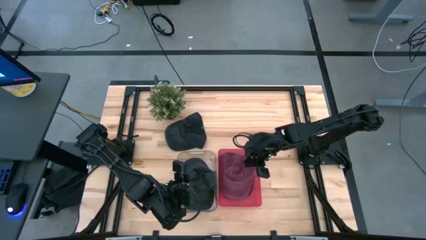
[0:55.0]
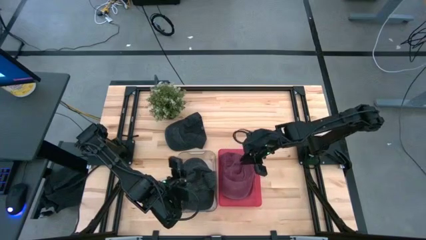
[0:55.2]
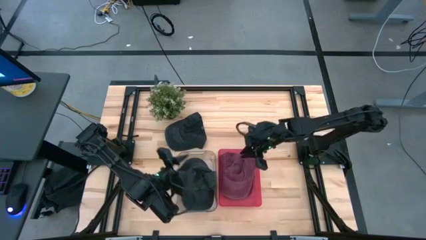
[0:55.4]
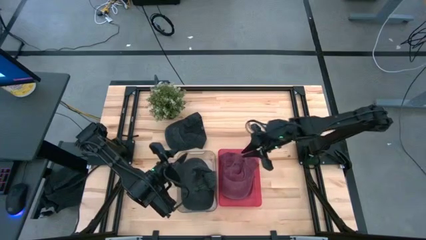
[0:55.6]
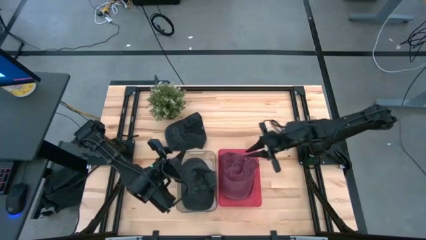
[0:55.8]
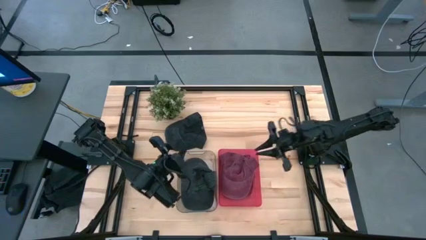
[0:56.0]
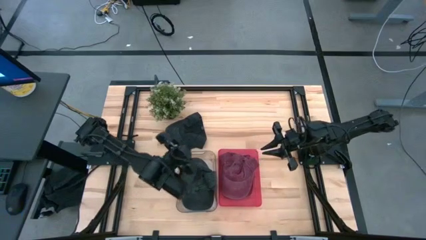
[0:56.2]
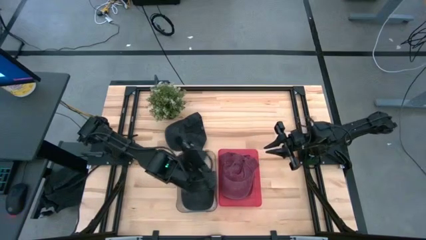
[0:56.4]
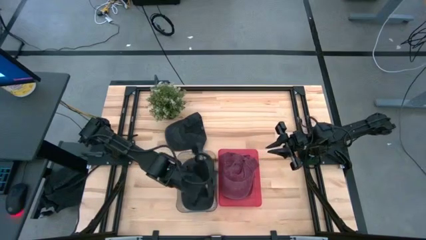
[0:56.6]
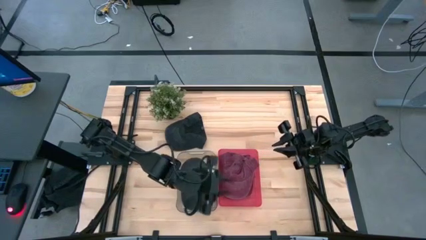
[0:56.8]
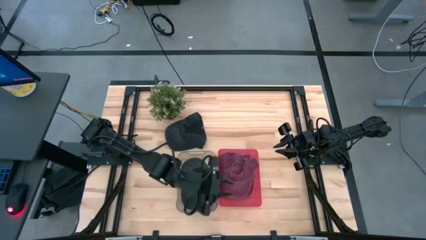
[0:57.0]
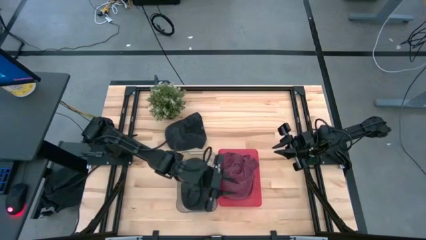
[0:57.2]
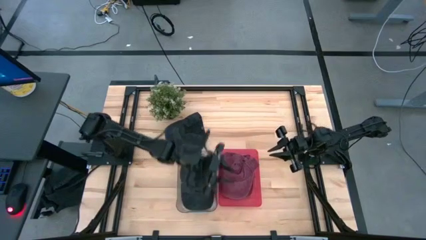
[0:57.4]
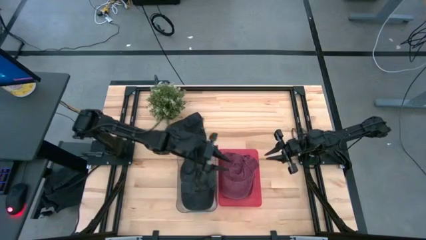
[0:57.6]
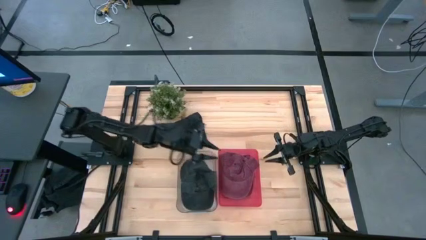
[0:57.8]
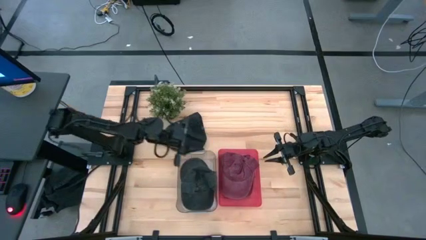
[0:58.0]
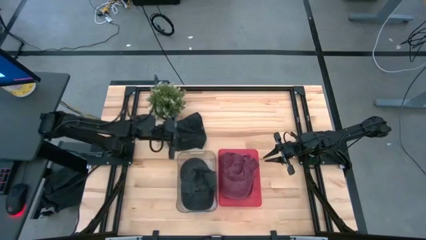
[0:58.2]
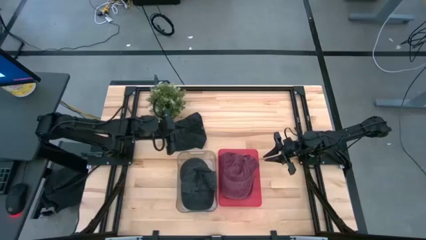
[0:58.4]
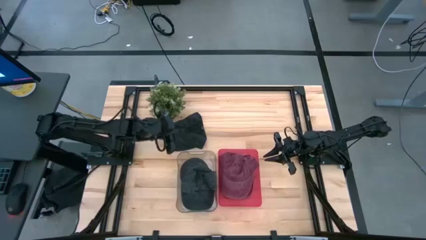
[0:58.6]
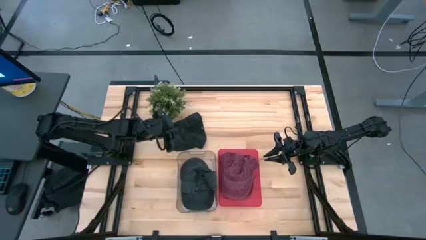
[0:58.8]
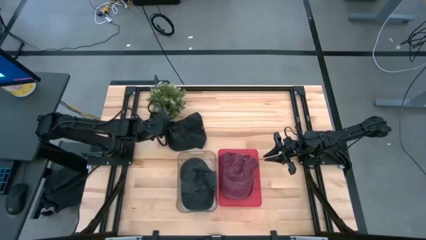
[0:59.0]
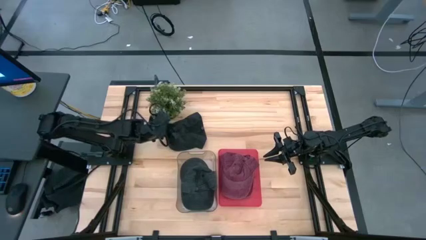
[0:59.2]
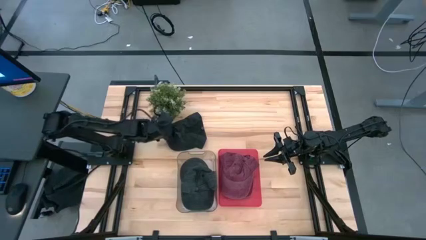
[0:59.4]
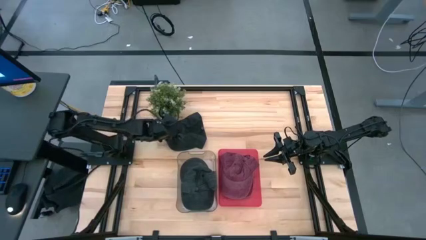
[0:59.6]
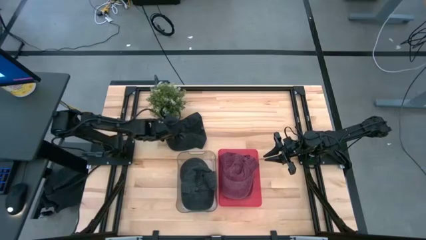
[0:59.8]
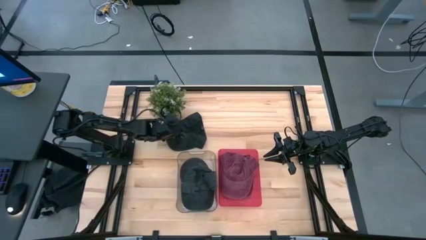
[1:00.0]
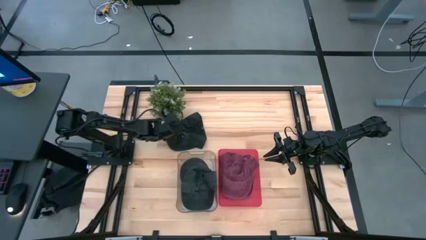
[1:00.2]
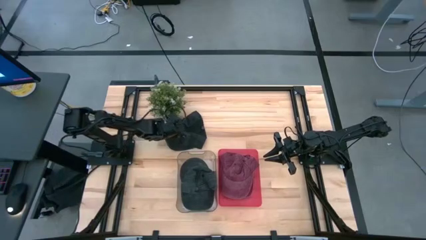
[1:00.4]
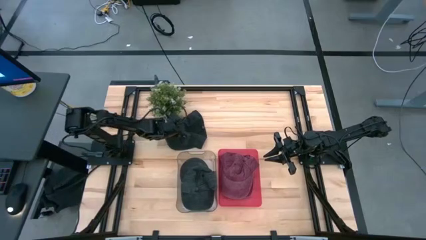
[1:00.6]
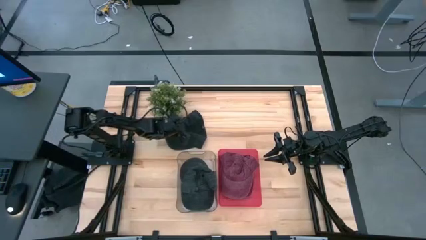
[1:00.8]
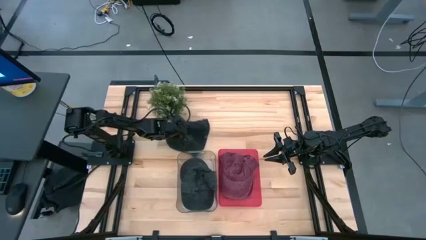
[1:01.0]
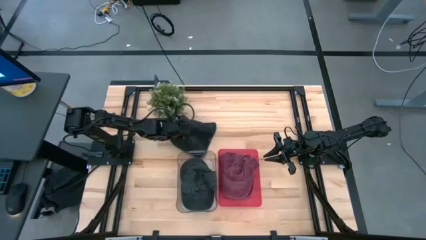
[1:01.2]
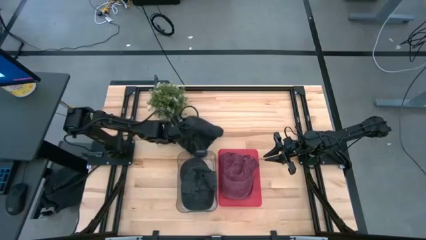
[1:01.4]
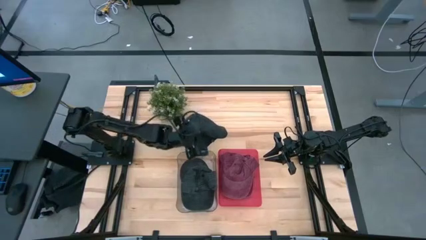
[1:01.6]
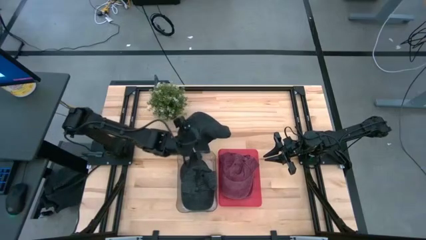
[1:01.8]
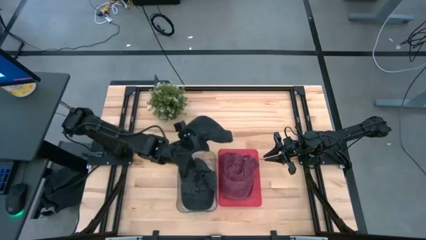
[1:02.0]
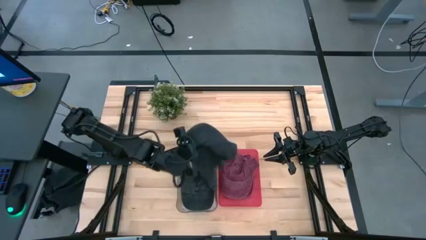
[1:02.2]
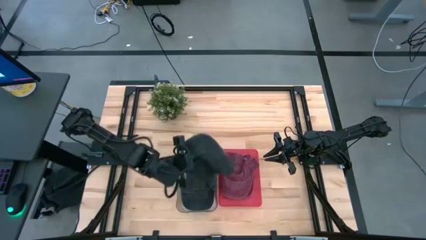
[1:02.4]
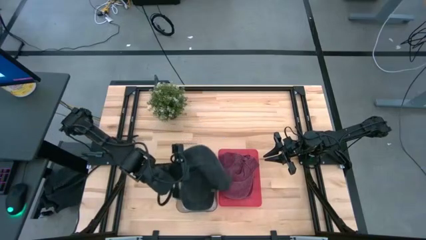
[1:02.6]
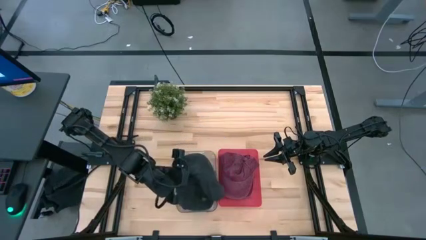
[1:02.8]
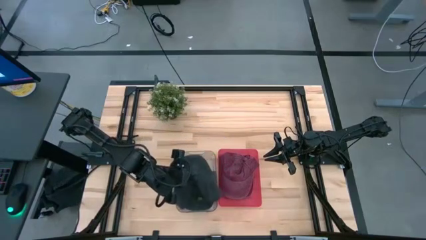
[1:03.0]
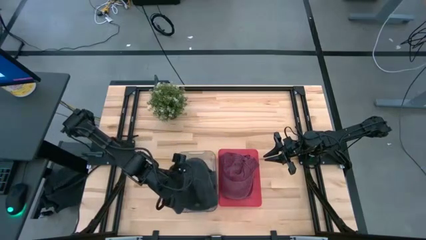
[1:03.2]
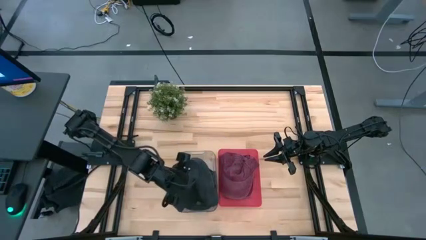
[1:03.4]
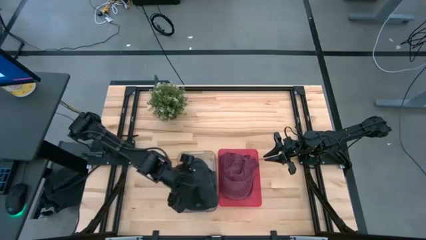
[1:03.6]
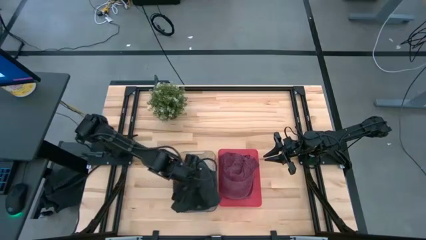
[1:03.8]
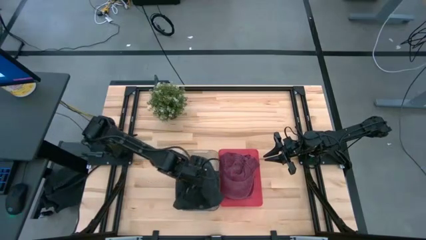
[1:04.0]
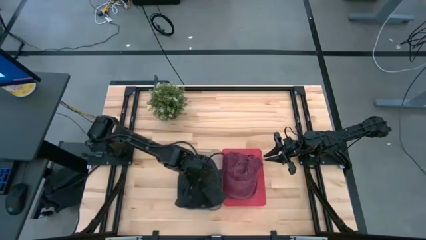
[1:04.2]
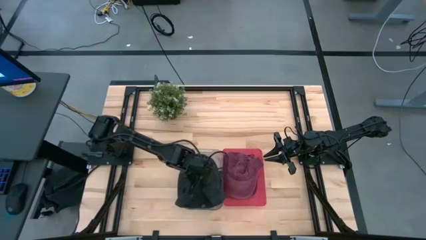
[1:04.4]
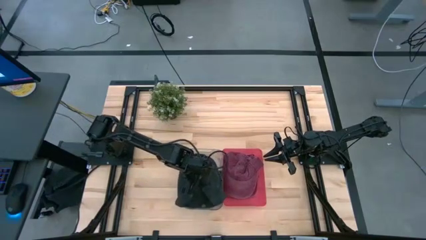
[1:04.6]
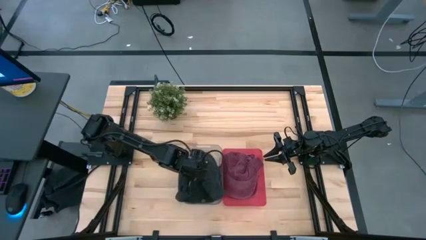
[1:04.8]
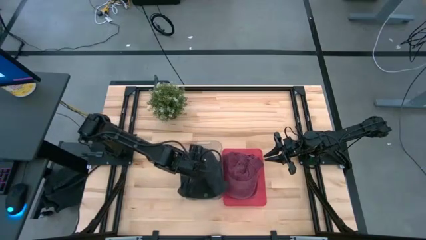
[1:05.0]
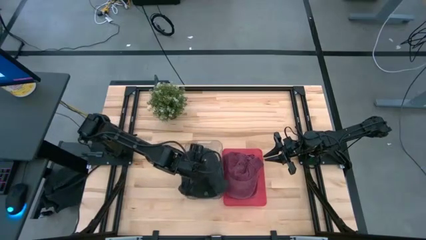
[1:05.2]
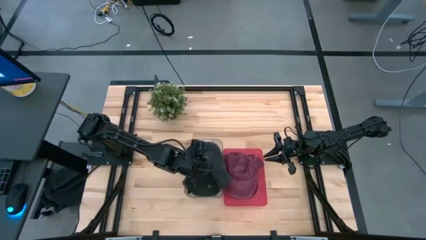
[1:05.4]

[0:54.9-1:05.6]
Task: Pick & Place hat
Put the black cap into the transparent bin
